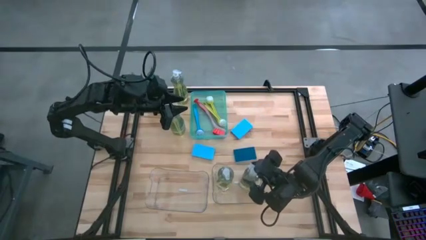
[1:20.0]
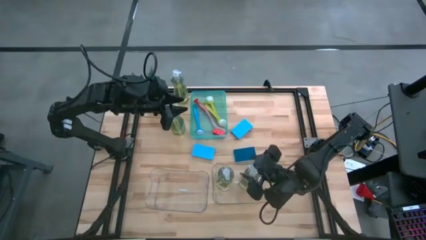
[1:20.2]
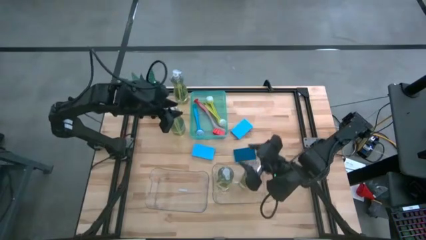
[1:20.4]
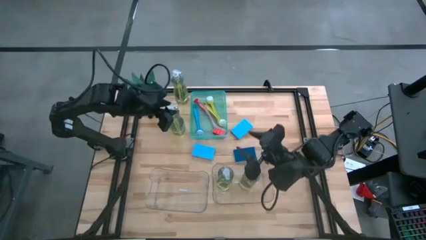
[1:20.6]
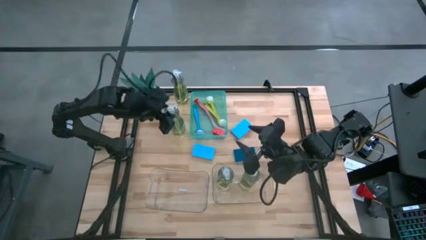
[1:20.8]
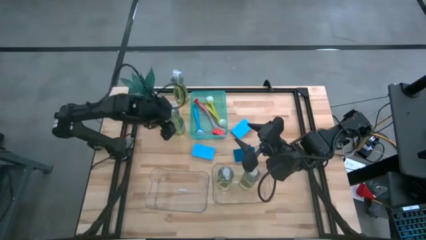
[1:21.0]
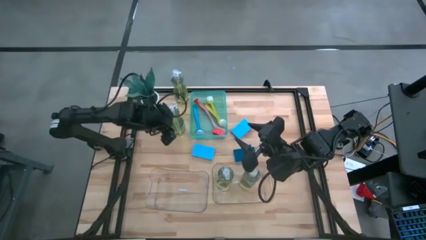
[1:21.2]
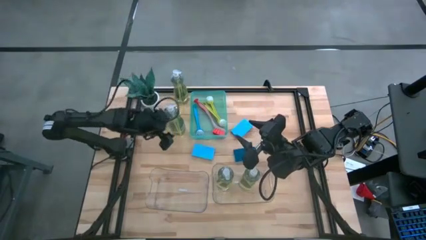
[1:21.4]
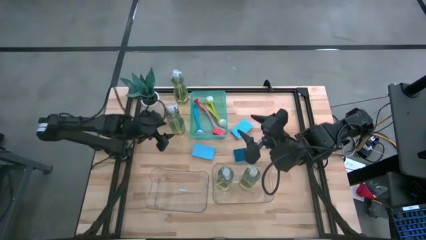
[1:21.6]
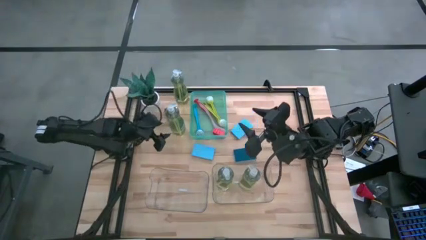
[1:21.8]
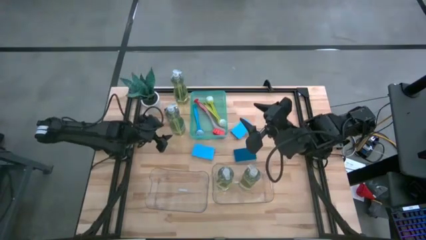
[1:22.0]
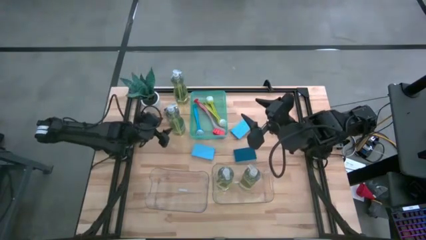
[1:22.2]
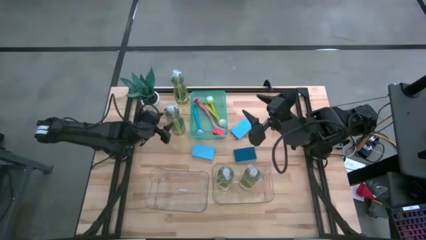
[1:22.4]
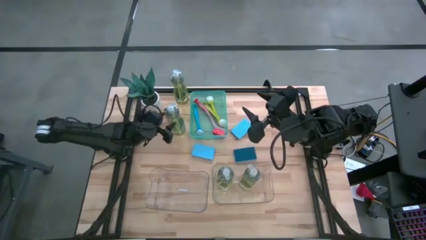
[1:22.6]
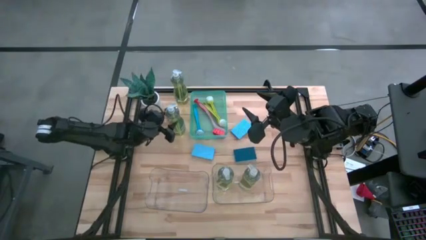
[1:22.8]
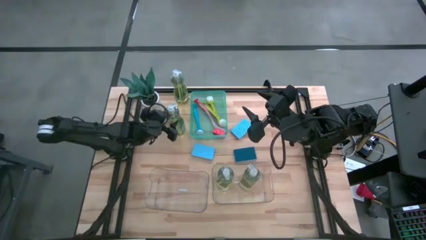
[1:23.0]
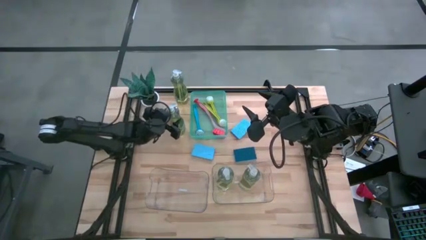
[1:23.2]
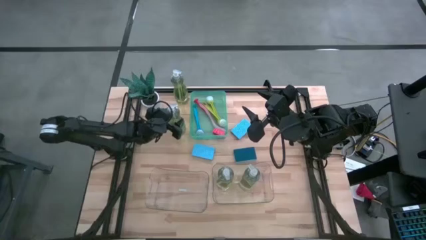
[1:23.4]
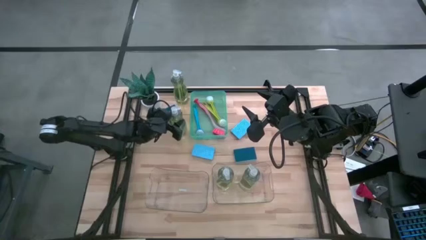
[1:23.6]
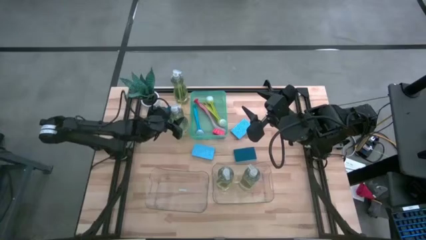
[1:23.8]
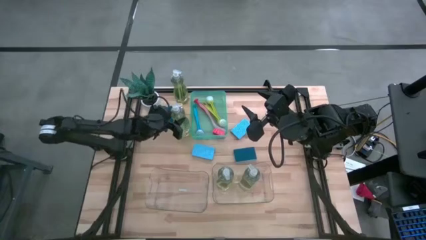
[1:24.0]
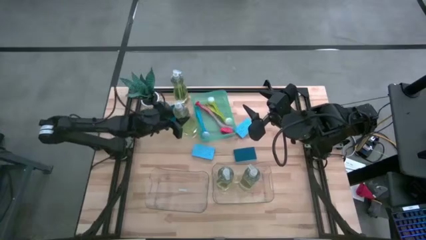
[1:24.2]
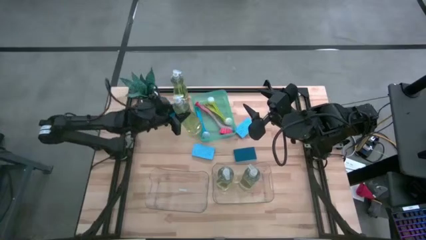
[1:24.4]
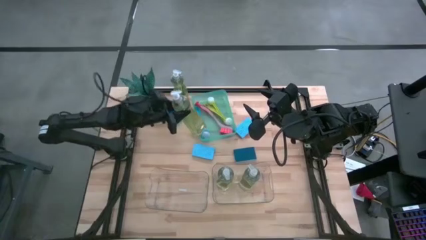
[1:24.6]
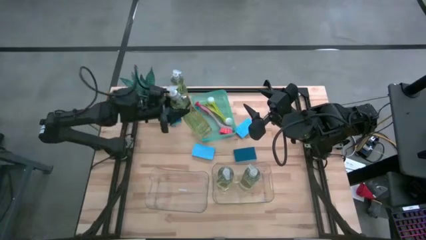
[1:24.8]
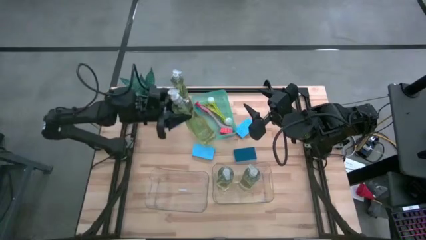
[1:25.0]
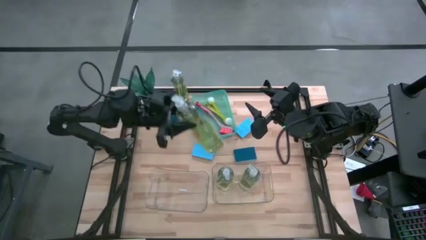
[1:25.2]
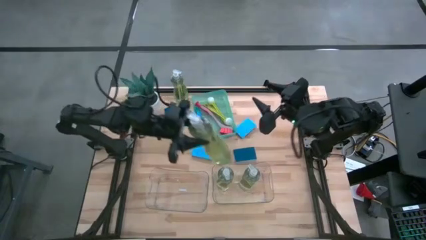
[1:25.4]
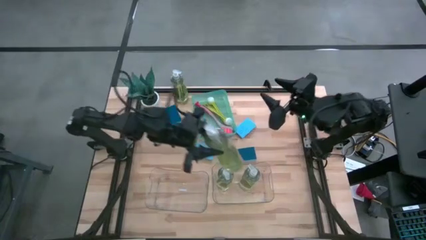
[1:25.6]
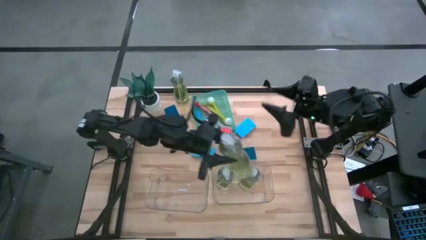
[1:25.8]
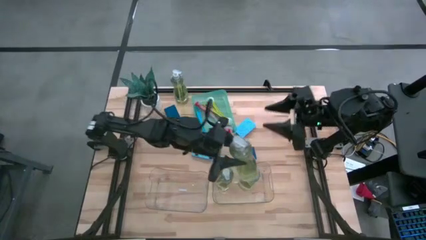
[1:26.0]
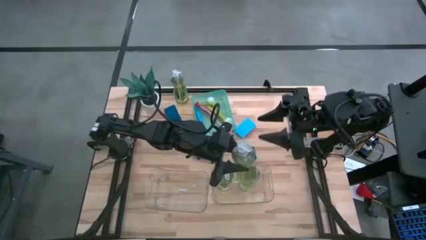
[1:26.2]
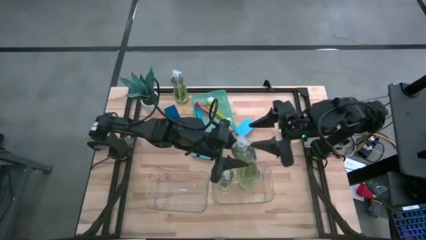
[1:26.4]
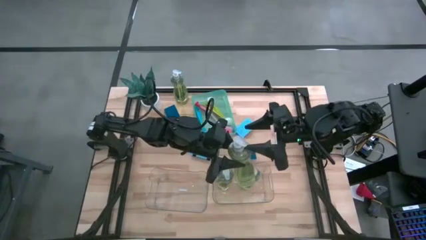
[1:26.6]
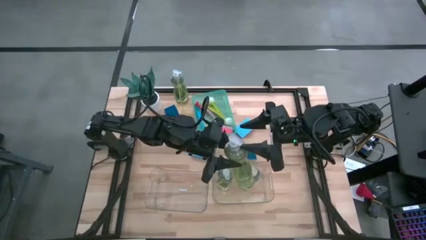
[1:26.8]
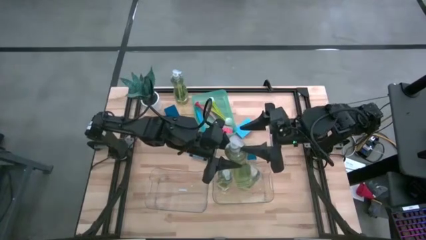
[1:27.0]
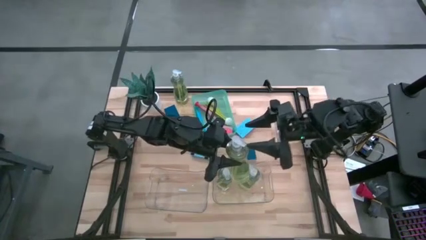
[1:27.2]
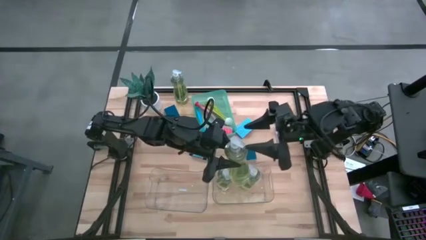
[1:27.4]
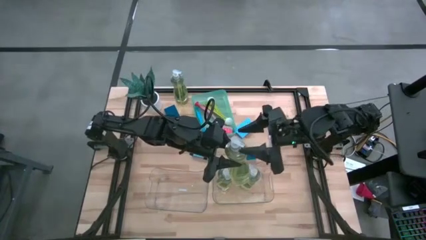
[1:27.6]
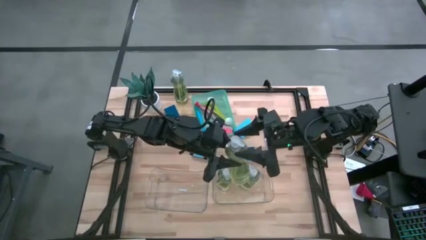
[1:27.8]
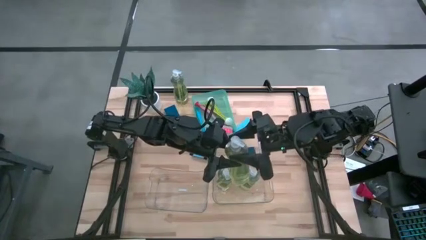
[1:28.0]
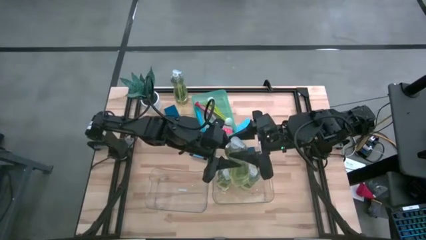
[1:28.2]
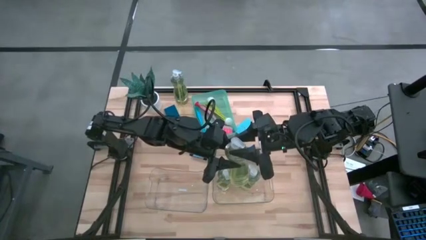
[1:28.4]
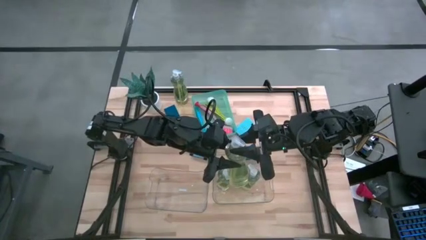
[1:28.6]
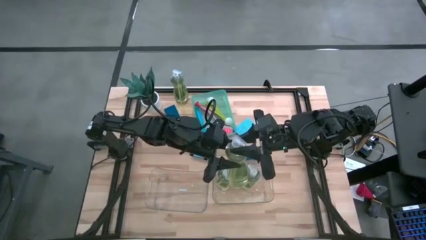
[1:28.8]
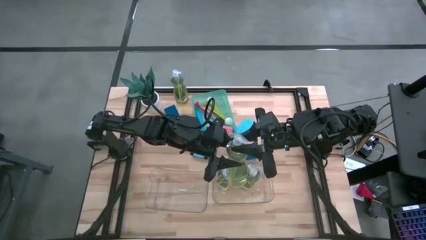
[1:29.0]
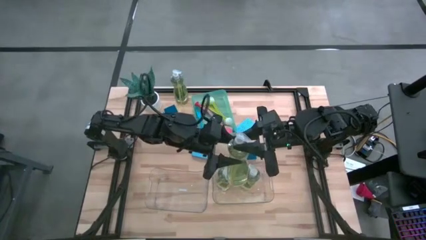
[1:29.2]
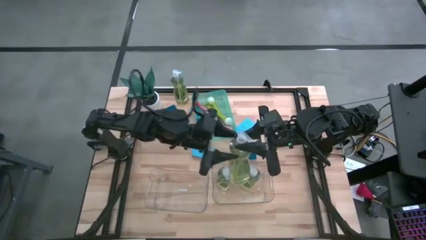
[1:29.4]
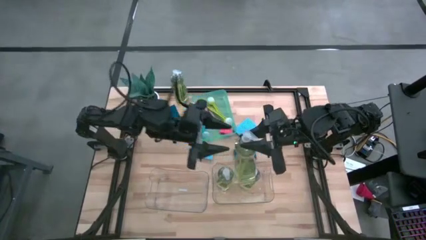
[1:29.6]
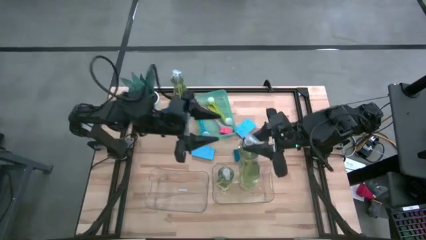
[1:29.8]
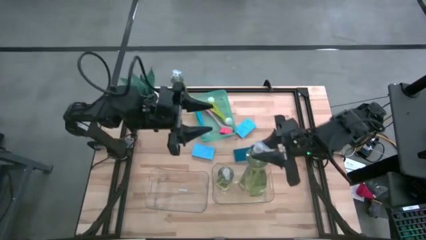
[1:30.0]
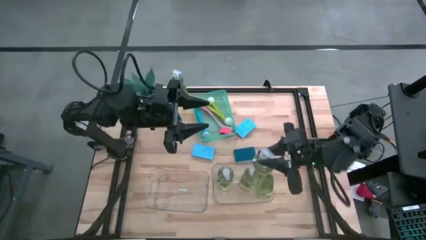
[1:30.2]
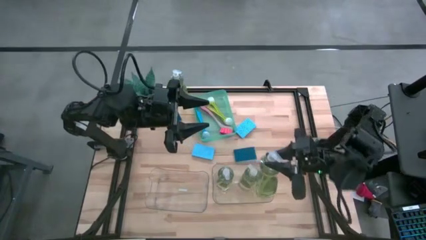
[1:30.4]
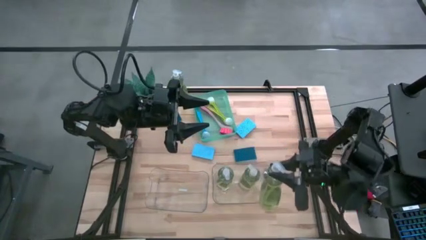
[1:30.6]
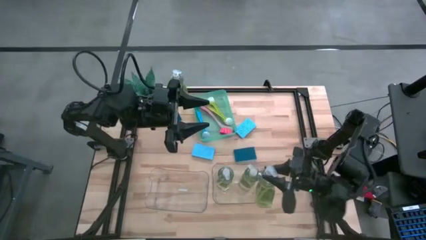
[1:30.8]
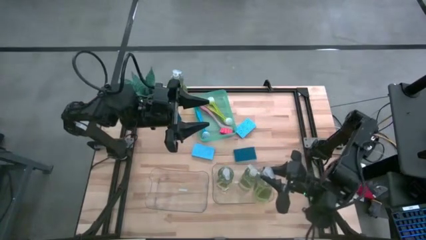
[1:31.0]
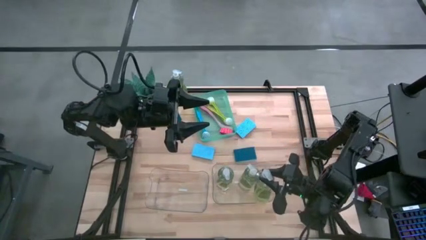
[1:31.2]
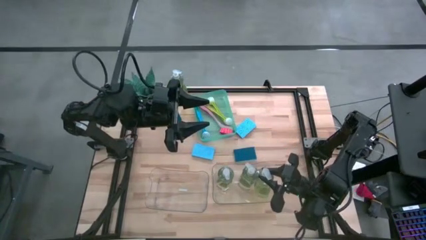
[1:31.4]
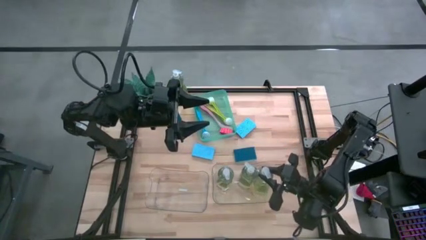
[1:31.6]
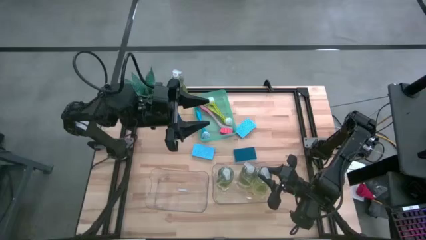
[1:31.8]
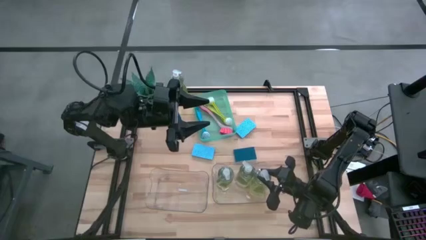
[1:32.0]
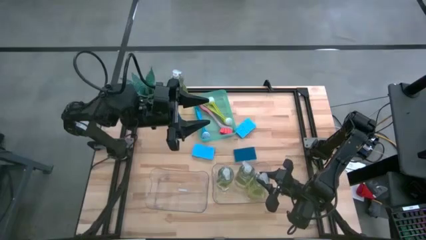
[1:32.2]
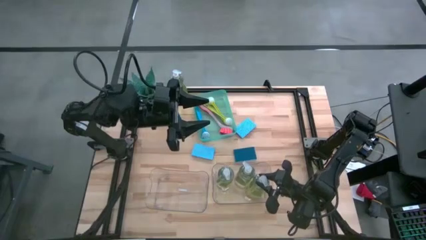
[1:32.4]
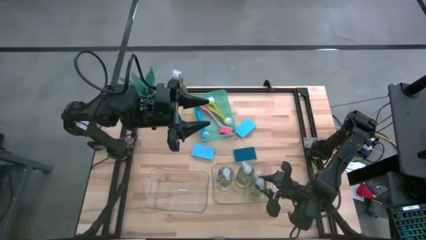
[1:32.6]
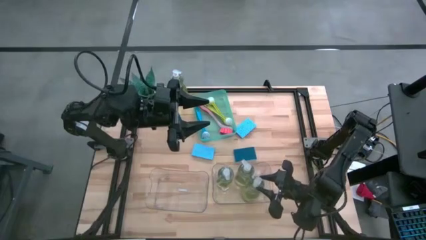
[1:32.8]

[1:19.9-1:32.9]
Task: Pick & Place Kitchen Sink Supplies
Put the soap dispenser into the right transparent bin

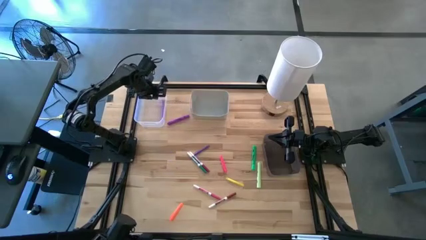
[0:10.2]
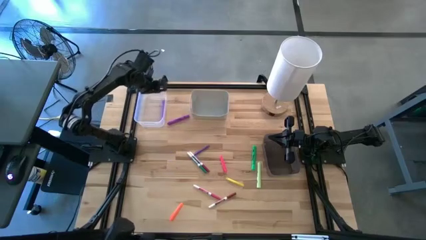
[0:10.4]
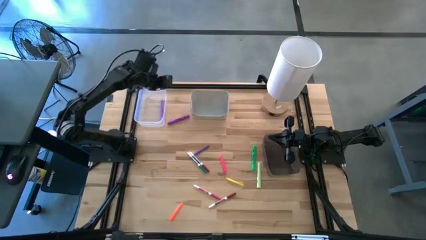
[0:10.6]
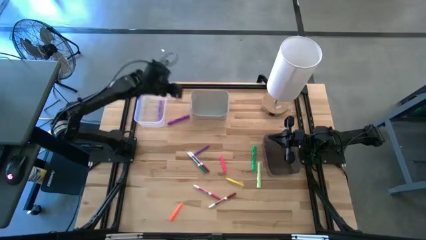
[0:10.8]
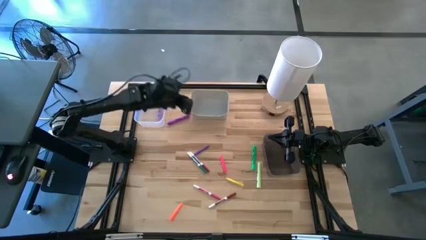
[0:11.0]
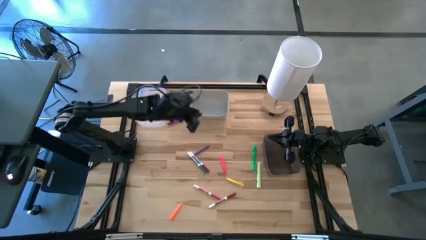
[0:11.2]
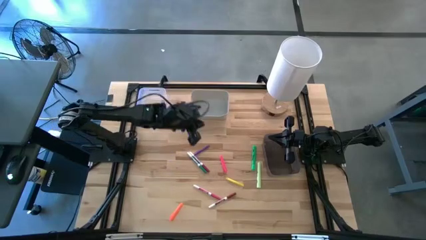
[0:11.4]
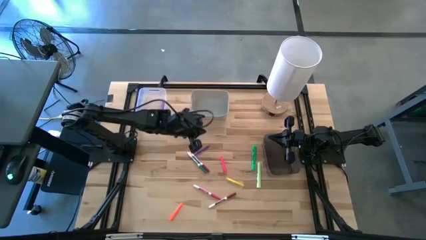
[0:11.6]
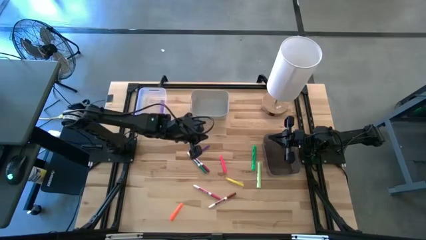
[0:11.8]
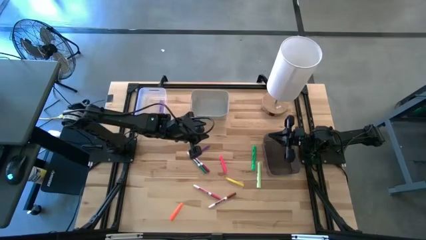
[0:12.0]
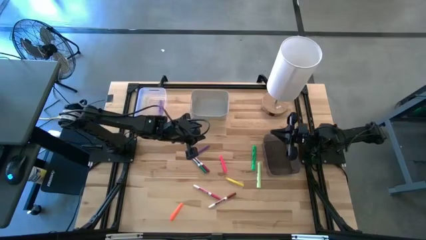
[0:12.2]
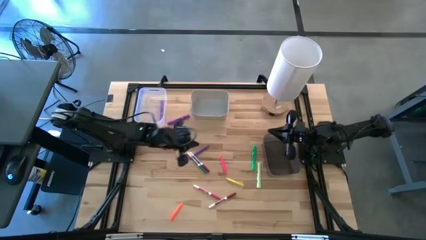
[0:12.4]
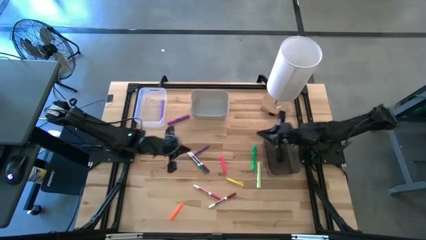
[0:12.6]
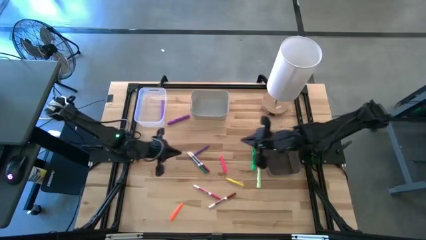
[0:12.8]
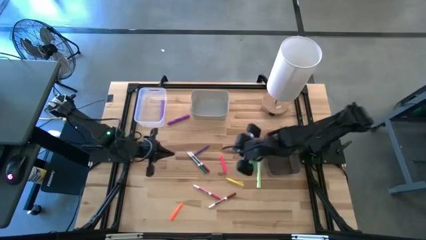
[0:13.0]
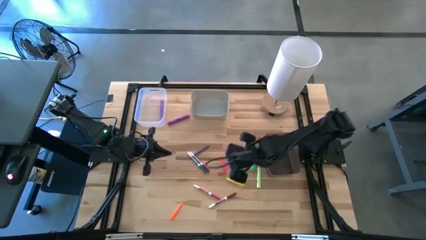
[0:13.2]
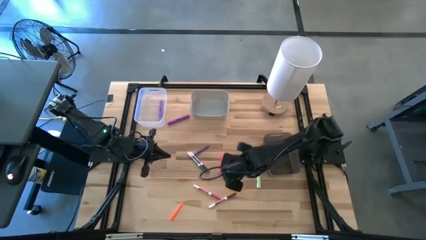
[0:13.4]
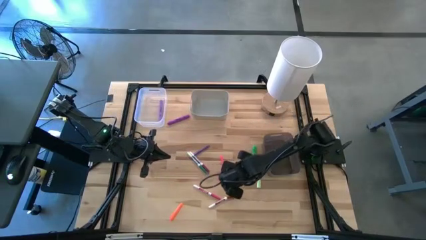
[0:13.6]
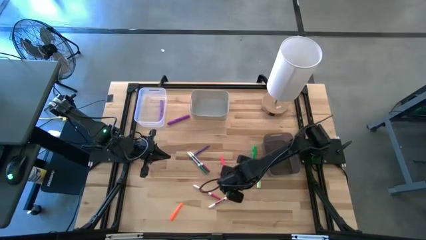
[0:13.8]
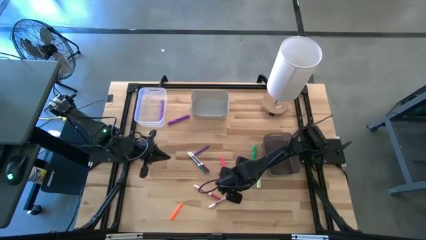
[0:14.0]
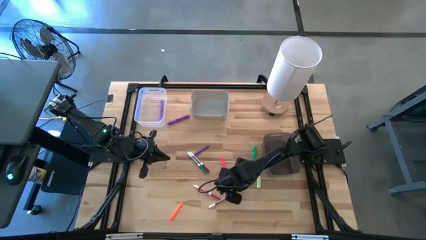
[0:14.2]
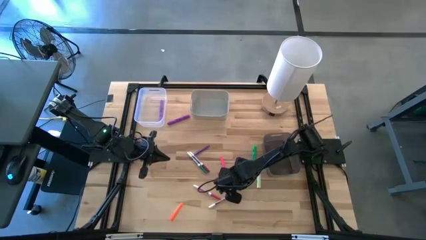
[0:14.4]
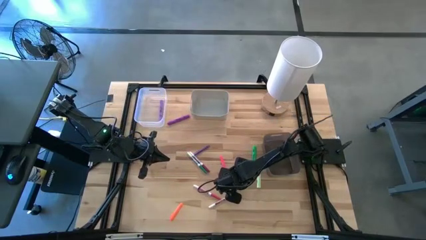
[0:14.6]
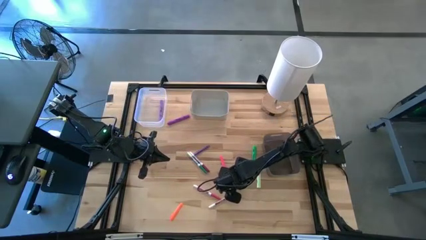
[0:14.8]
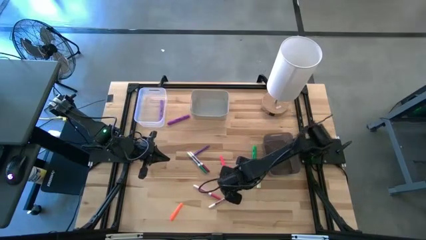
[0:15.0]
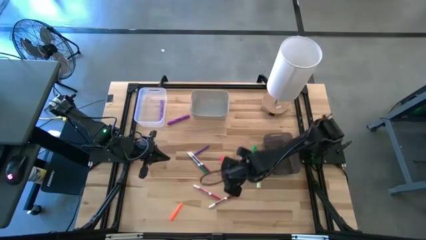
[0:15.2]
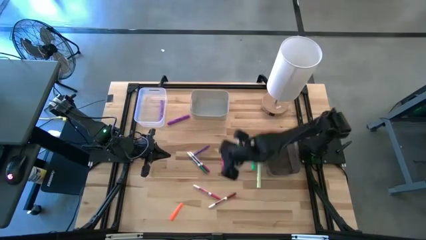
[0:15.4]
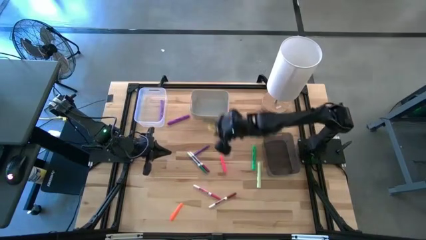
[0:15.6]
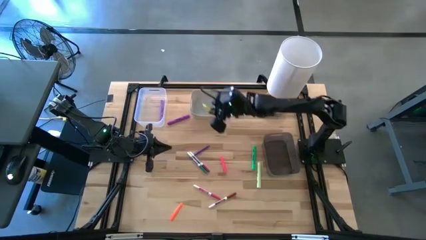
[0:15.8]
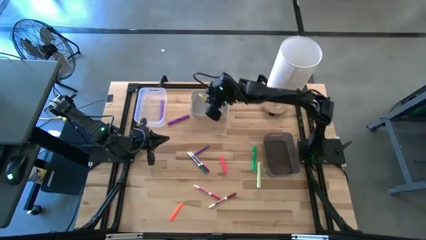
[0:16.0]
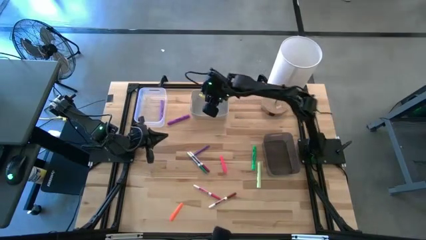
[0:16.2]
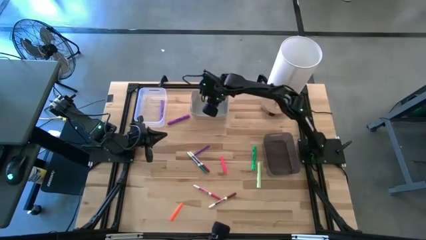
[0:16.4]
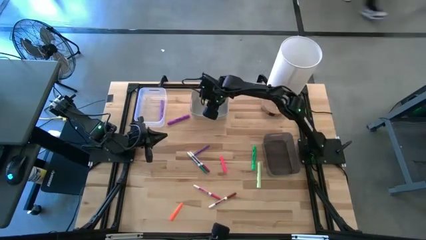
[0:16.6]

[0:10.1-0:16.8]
Task: Pick & Place Markers
Put the yellow pen into the gray bin
